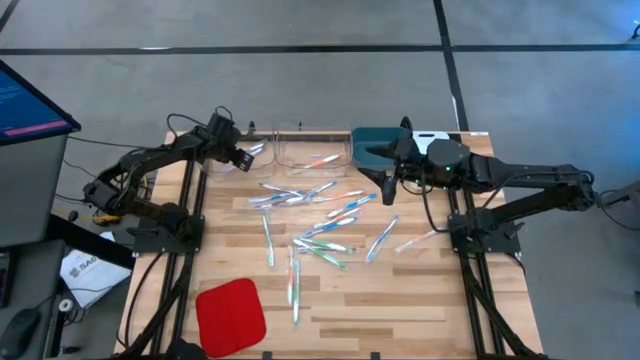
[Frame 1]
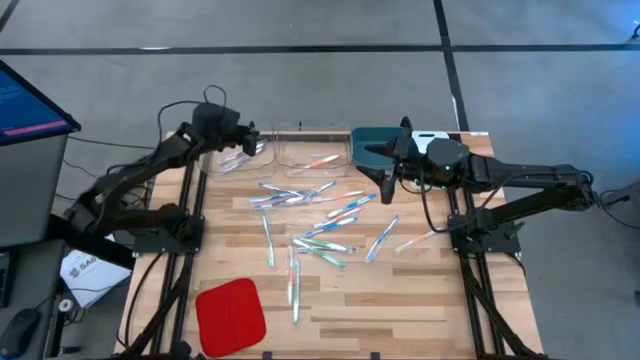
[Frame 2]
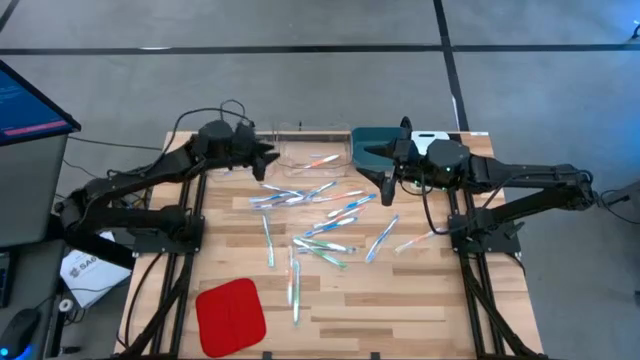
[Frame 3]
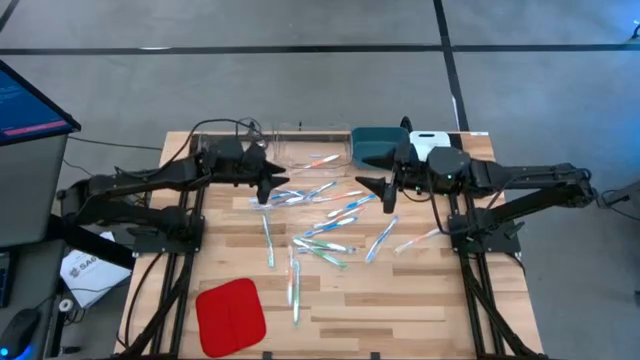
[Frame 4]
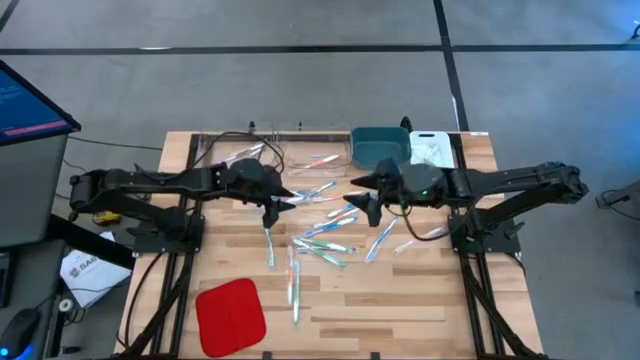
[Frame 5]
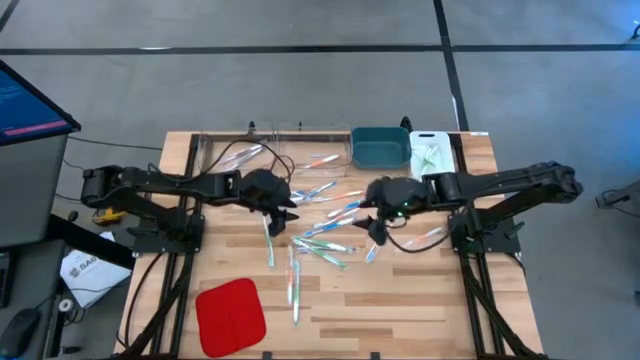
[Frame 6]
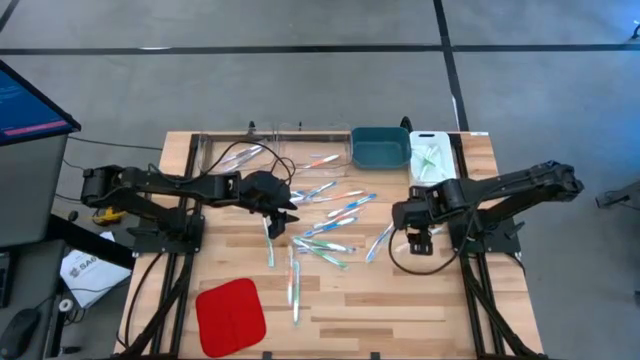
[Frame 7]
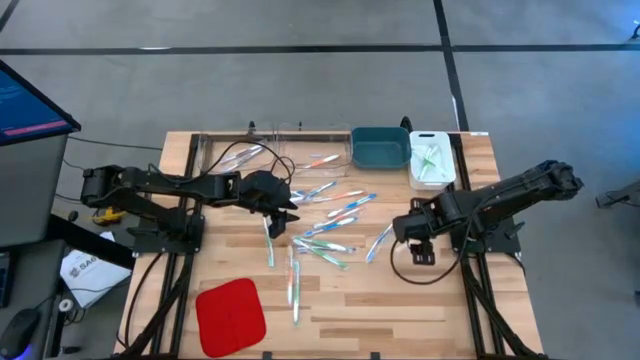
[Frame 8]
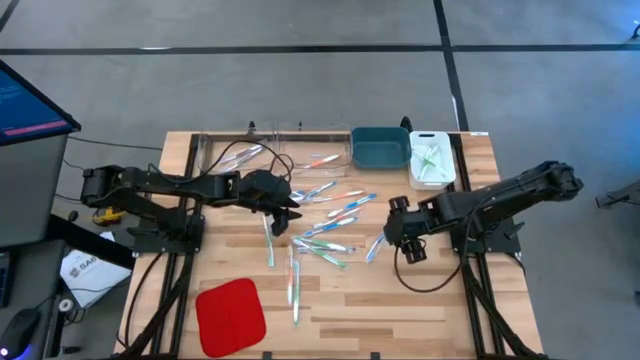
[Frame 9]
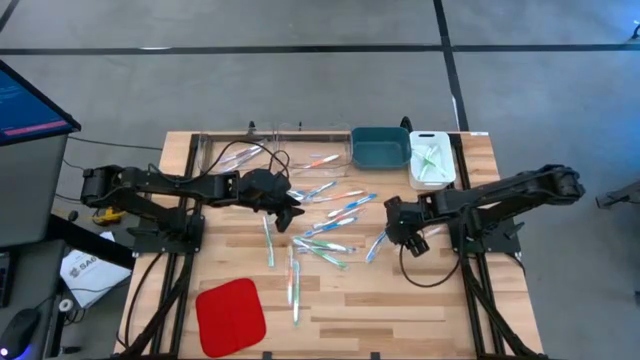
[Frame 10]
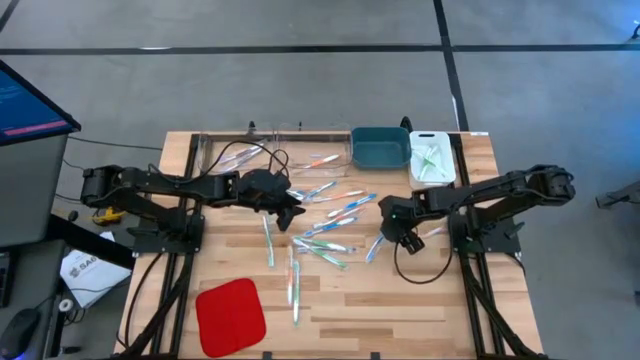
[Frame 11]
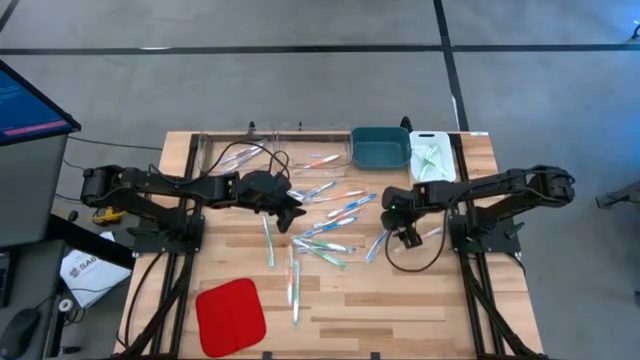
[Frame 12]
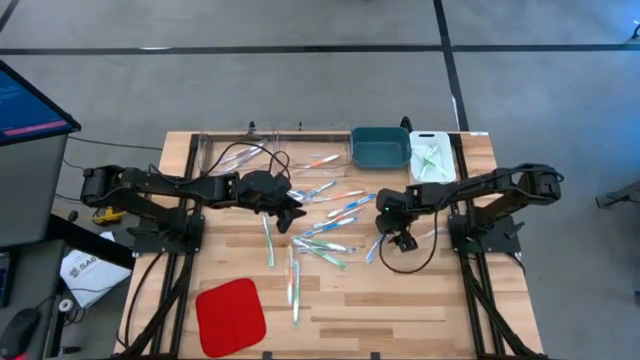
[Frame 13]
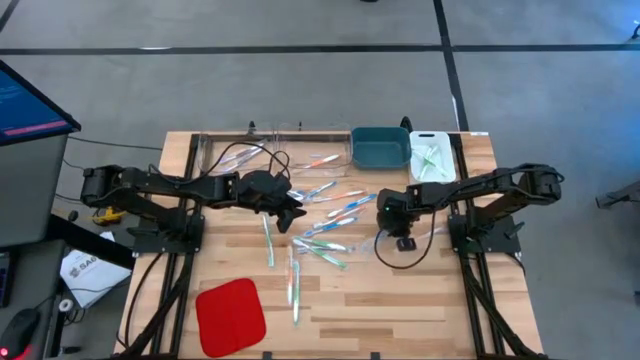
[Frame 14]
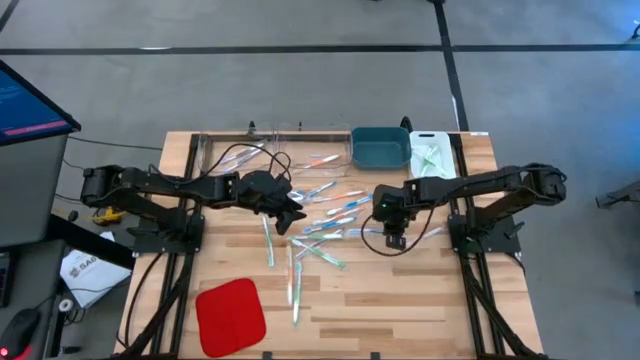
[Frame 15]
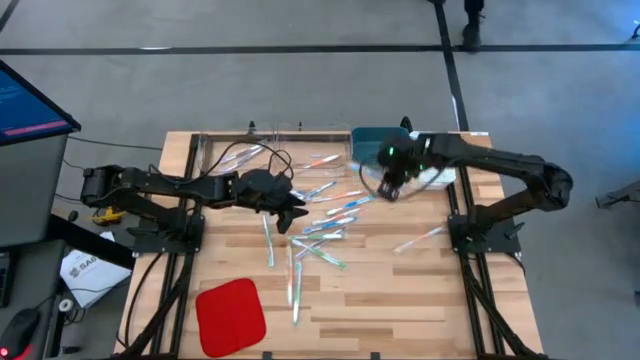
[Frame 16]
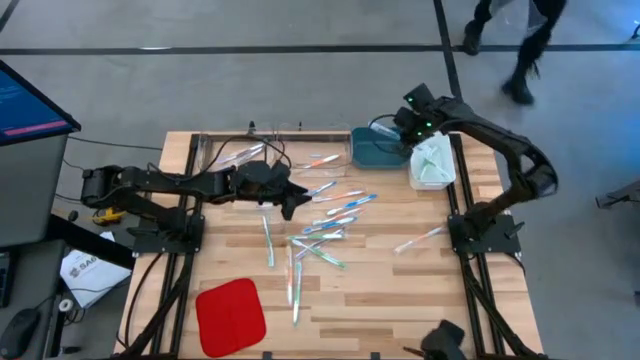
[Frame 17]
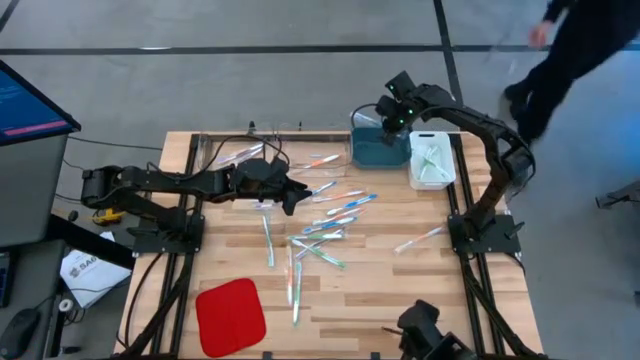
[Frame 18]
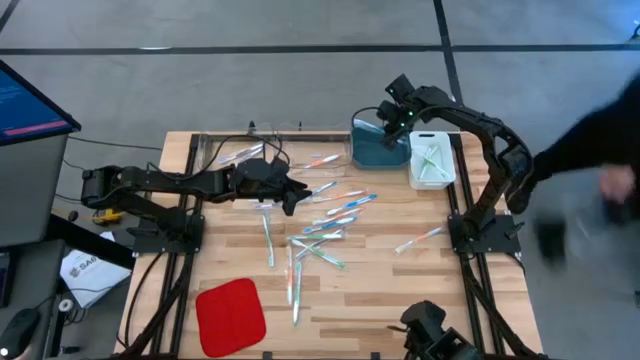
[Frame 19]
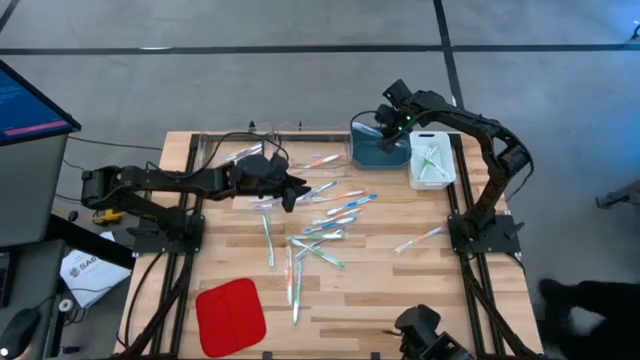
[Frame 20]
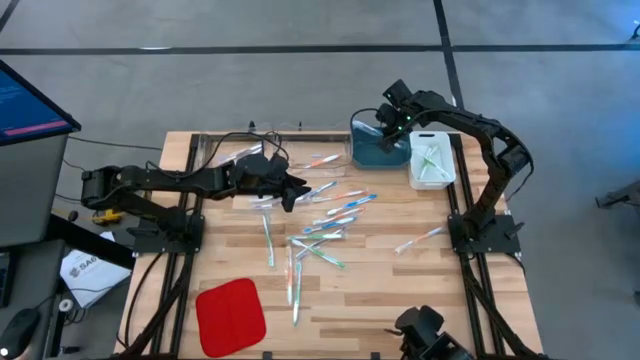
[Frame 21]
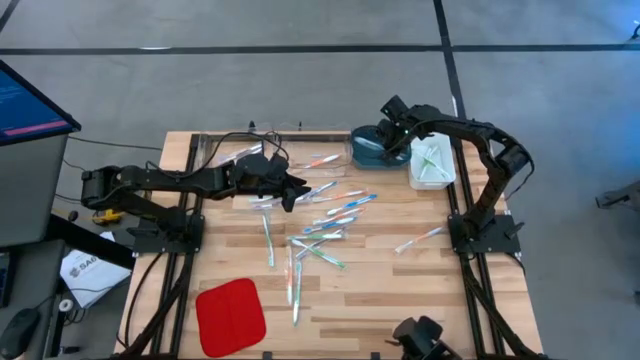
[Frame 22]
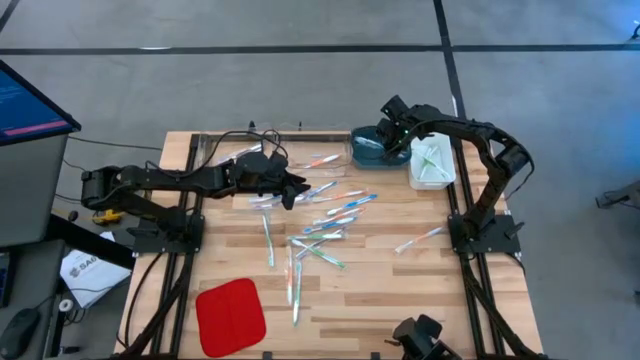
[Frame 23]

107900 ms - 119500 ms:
Task: Pick & Place Toothbrushes
Put the blue toothbrush into the blue bin

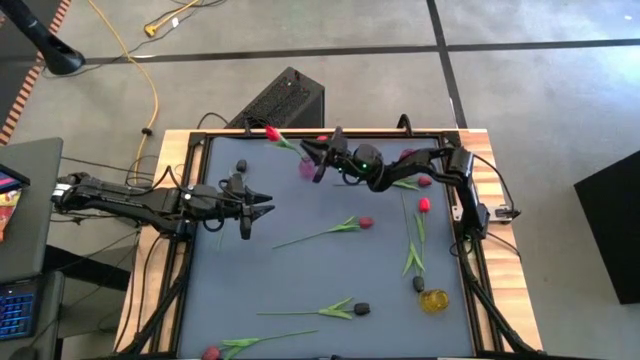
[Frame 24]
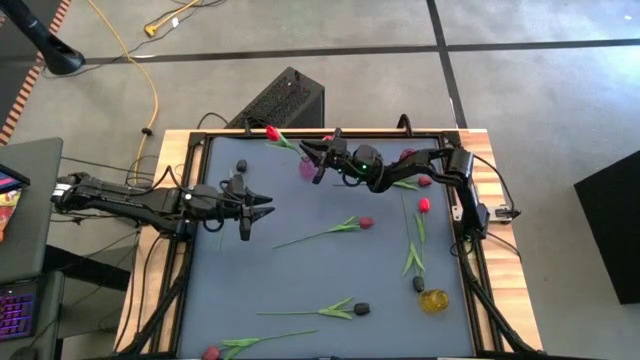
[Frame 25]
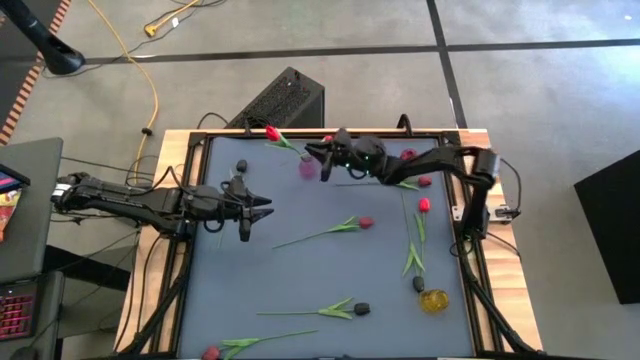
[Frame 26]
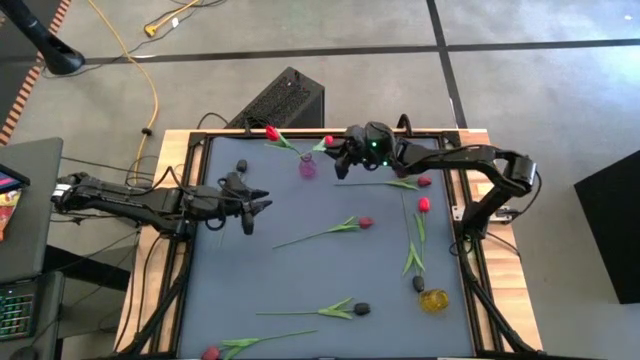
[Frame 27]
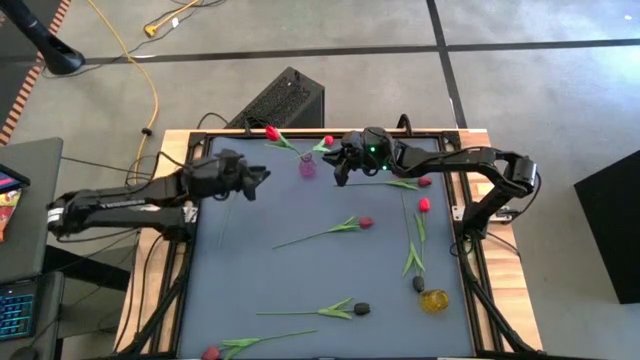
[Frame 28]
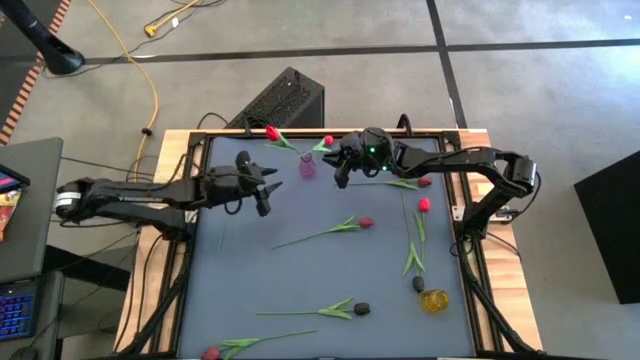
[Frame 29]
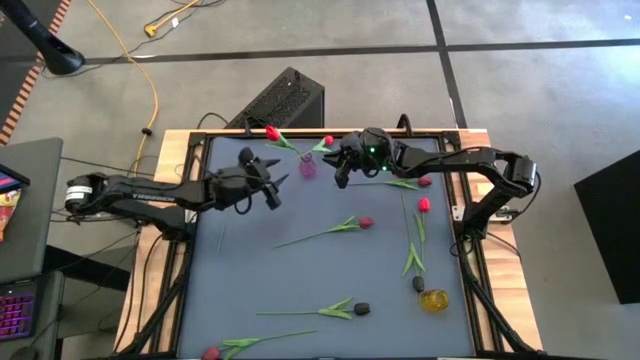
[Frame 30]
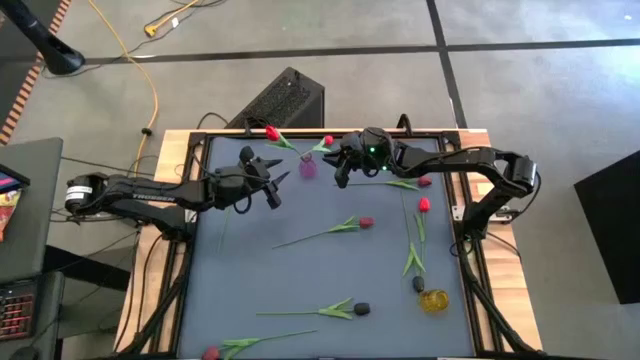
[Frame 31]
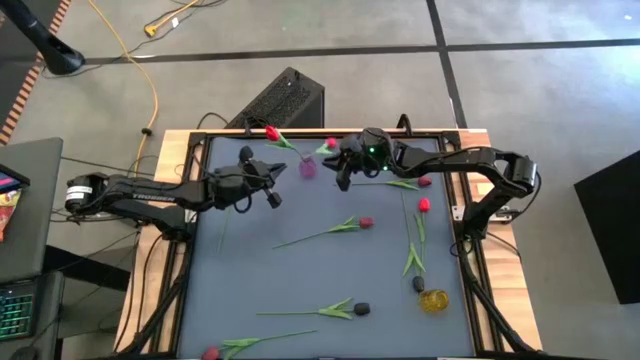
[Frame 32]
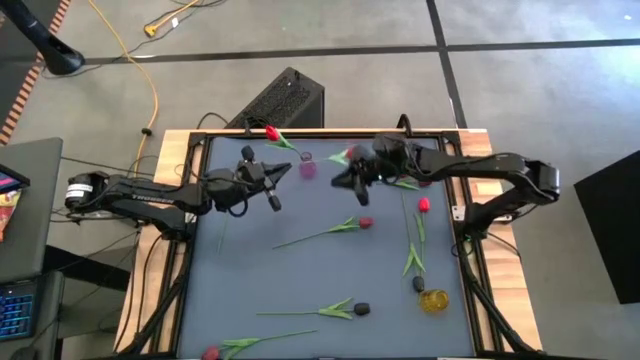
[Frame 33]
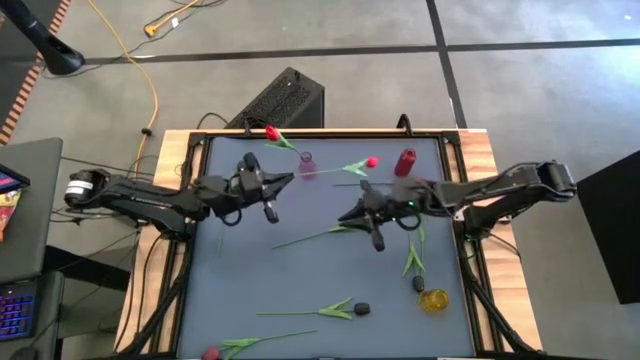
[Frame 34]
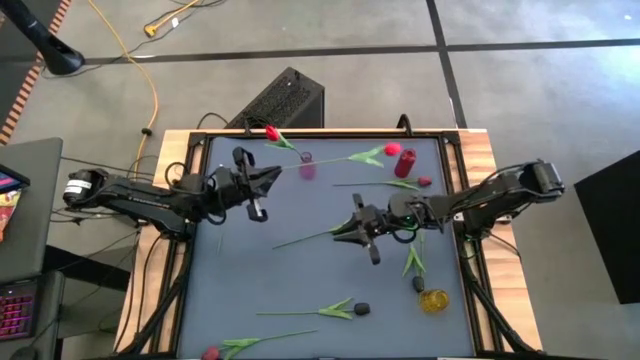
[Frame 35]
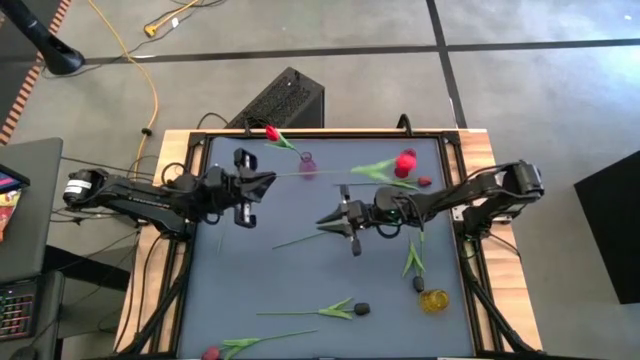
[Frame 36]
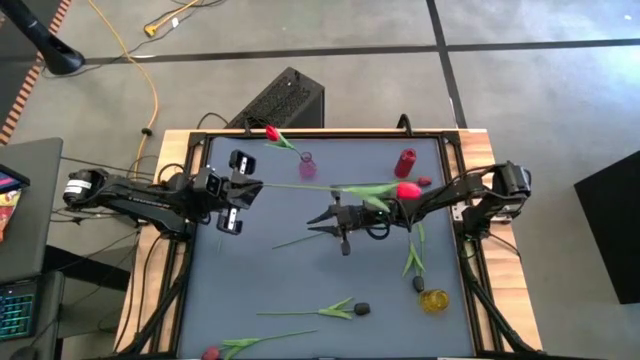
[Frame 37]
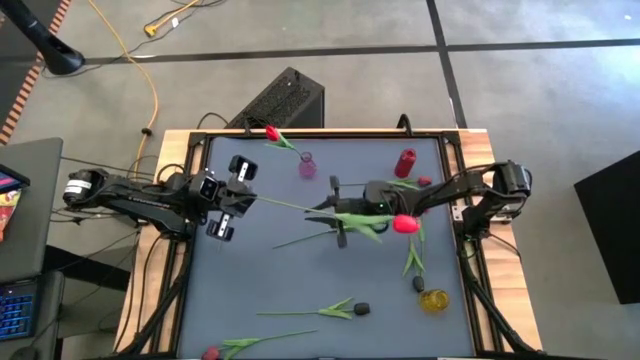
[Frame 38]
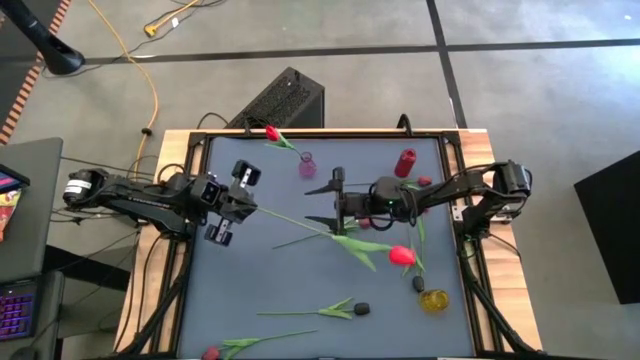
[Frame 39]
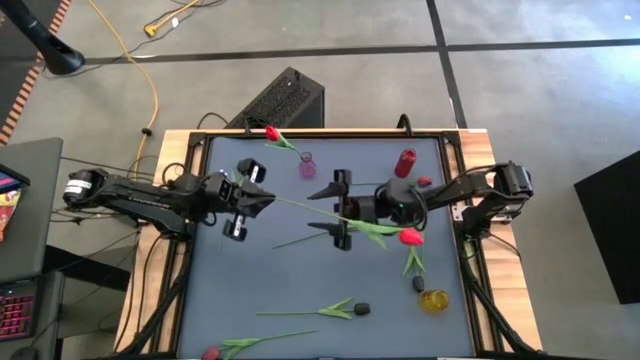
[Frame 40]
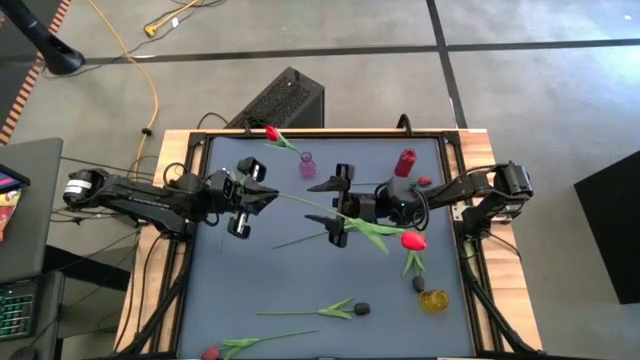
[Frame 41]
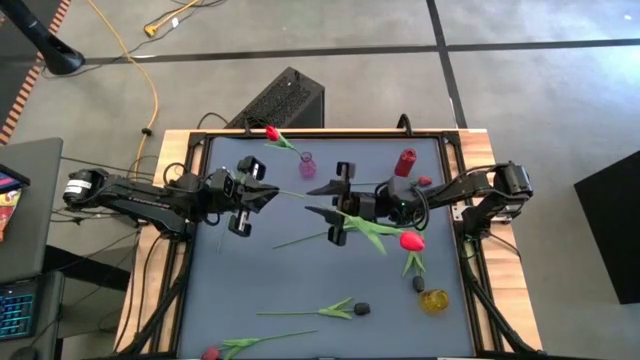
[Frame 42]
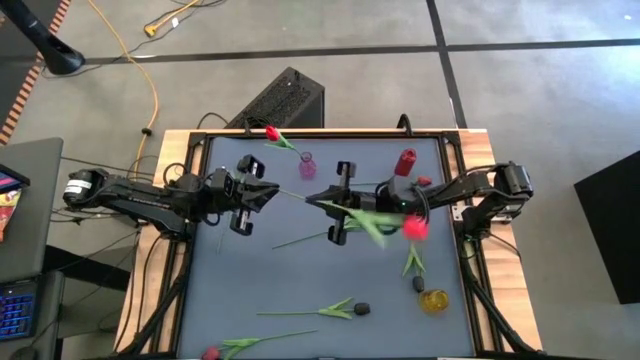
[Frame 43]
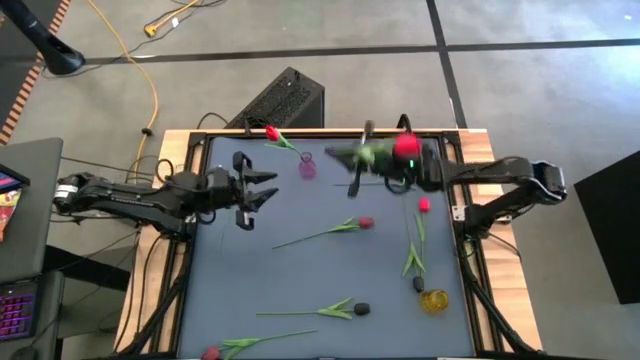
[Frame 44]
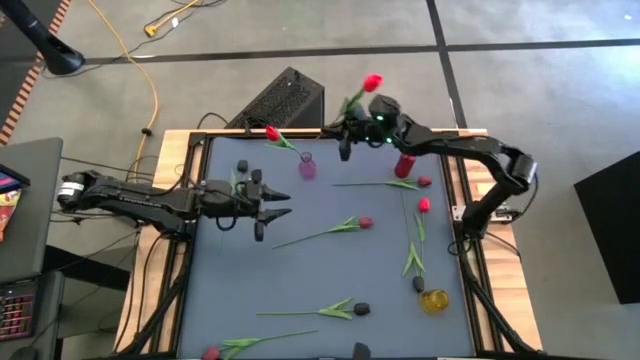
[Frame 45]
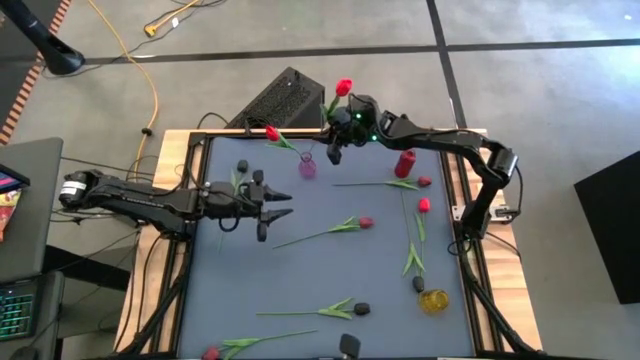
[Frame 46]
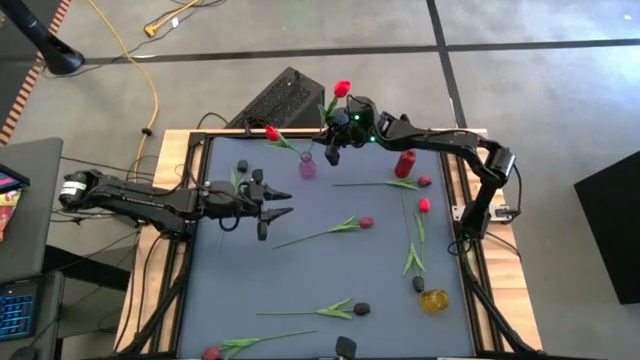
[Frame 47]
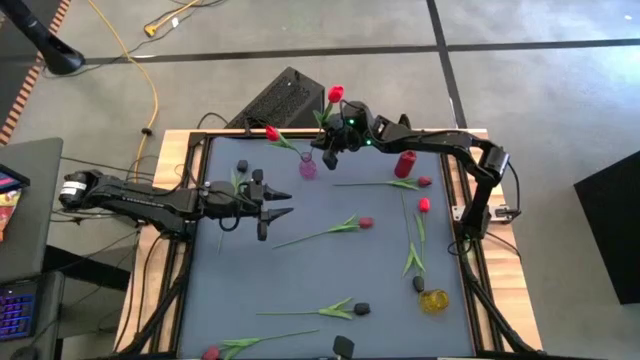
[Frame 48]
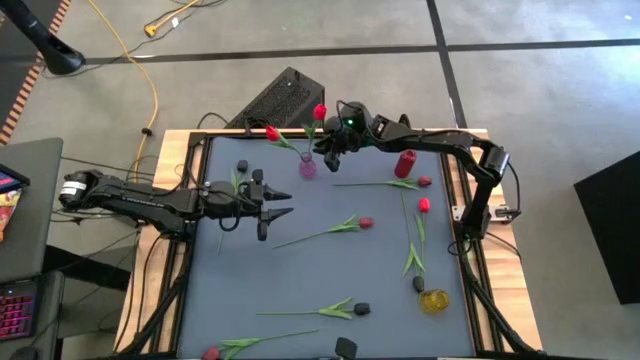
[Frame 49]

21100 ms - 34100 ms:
Task: Sort flowers into vase by color
Put the left pink flower into the purple vase
